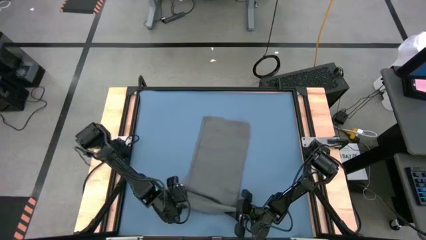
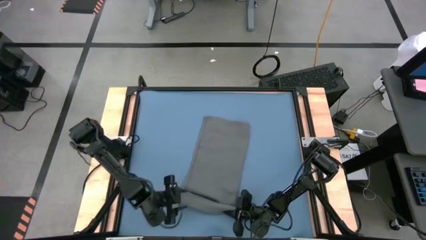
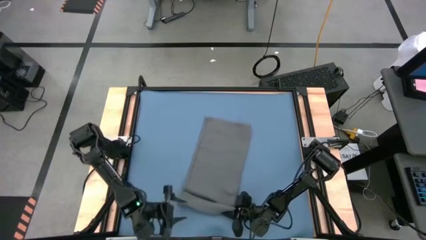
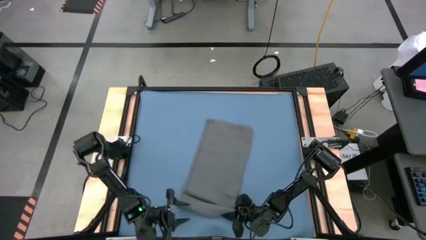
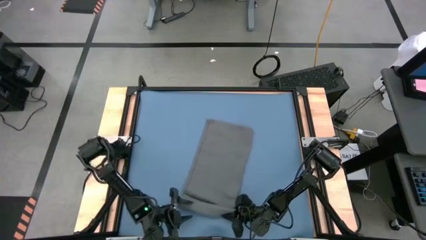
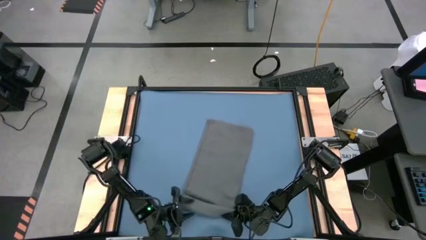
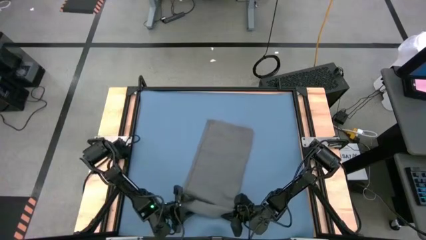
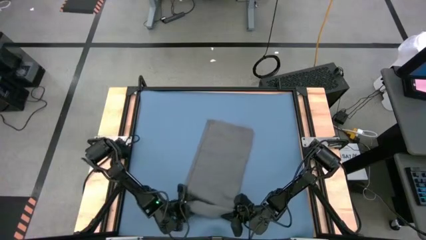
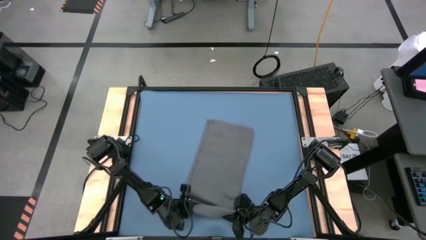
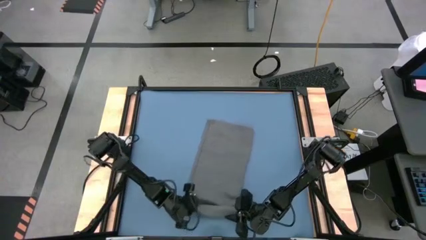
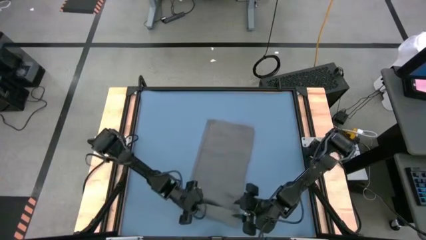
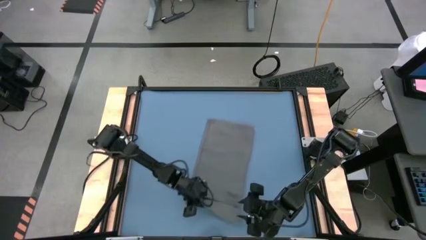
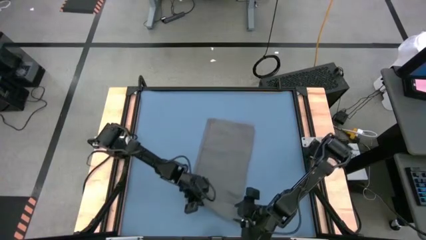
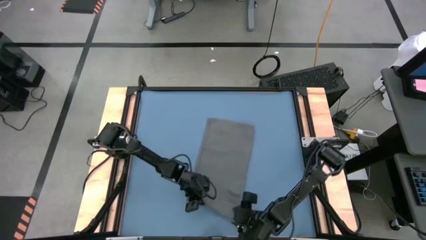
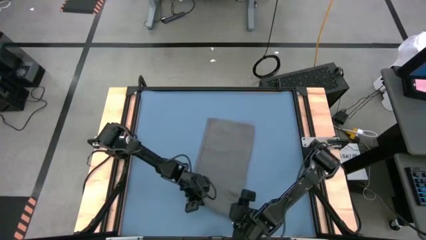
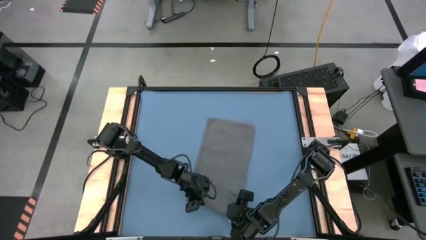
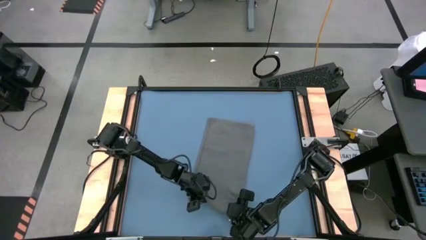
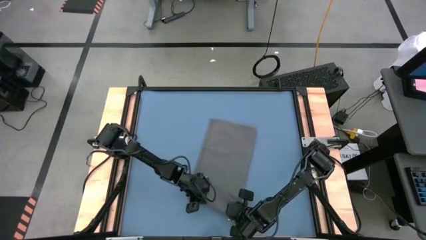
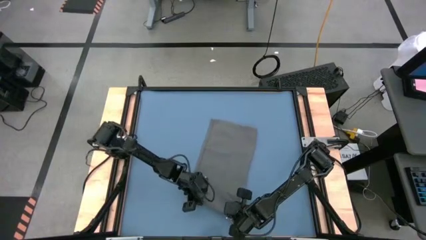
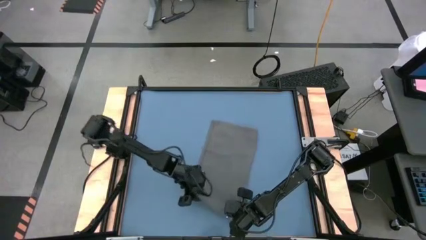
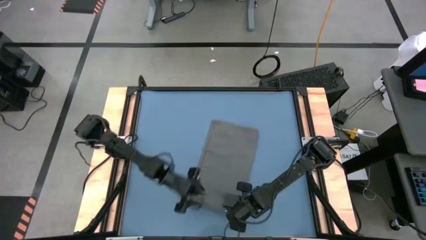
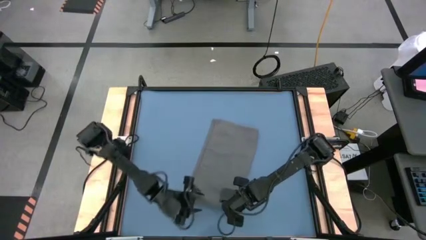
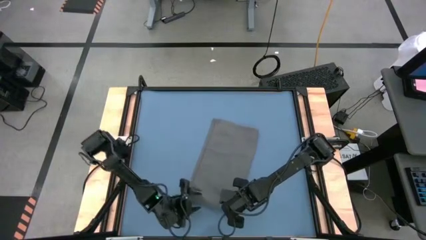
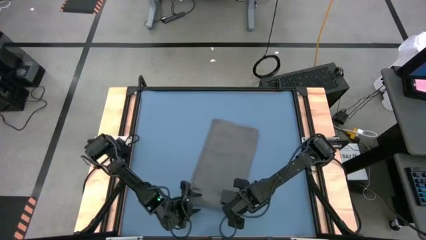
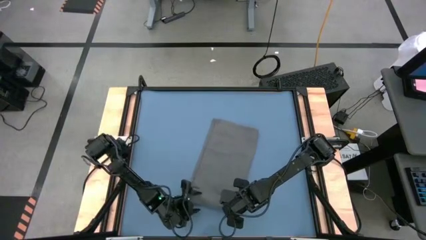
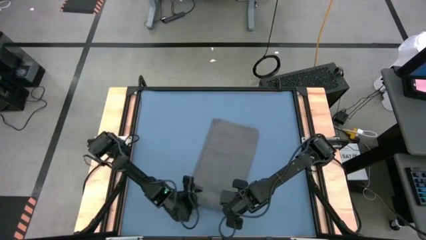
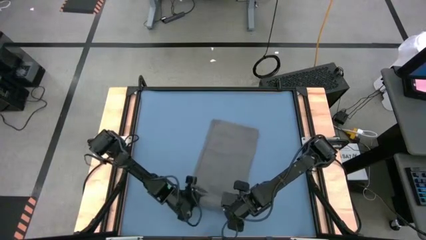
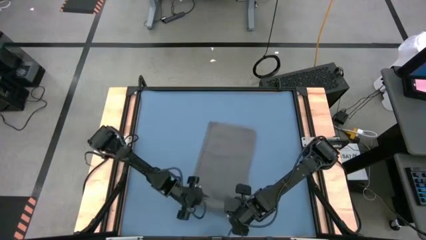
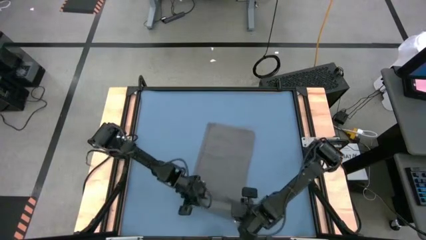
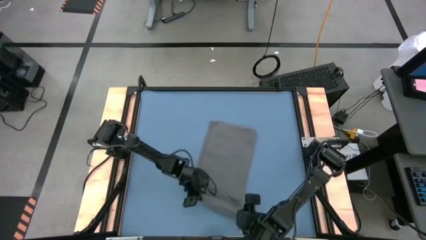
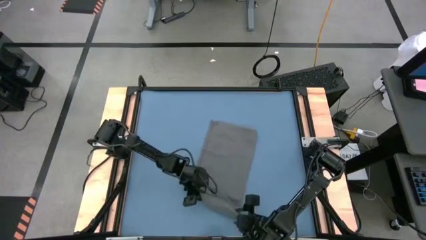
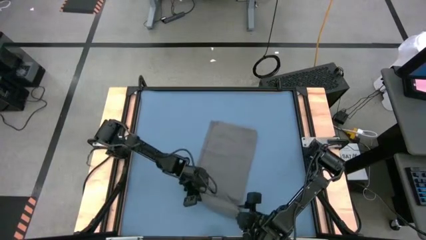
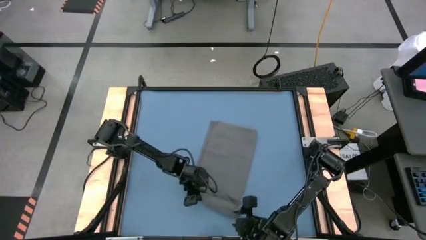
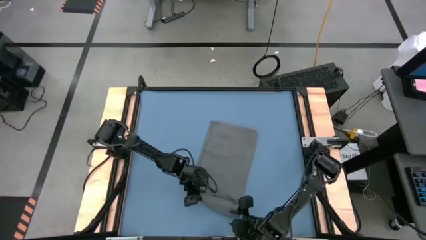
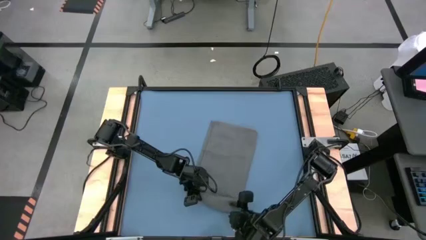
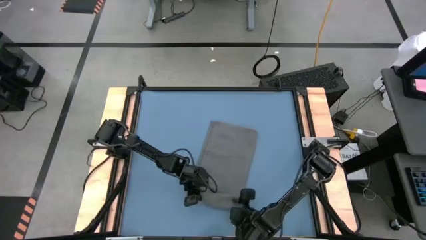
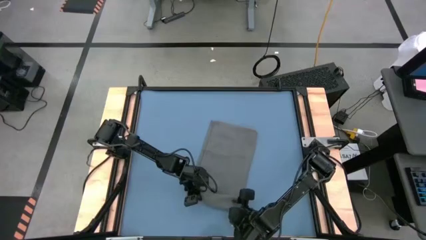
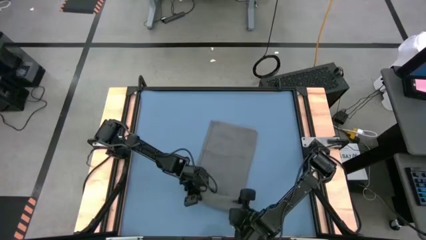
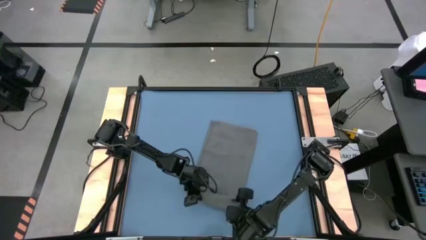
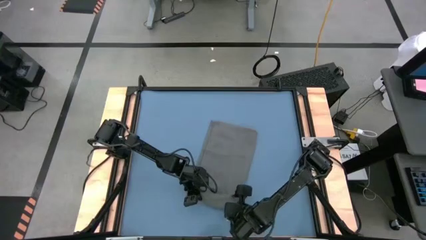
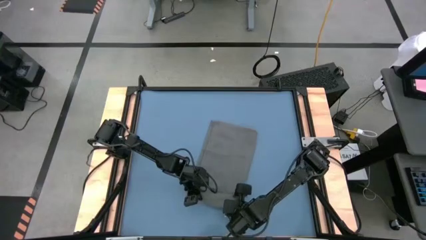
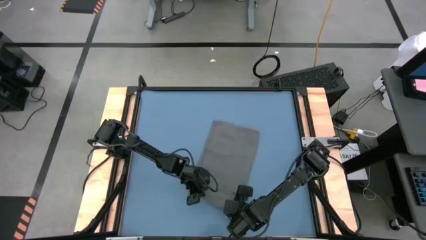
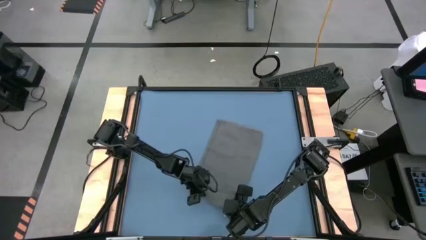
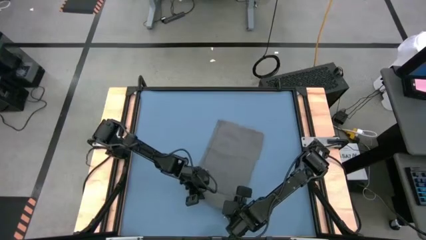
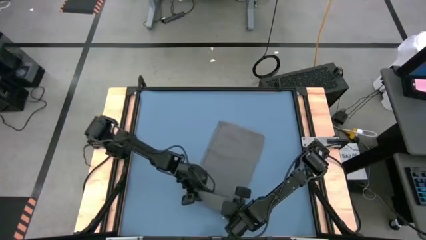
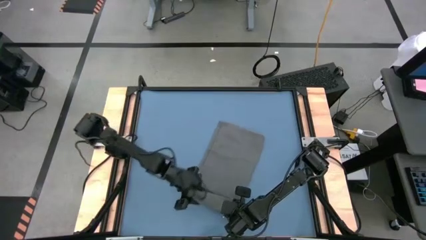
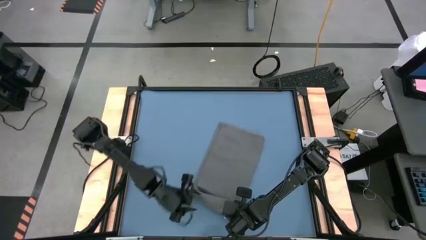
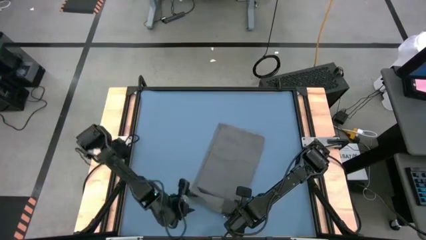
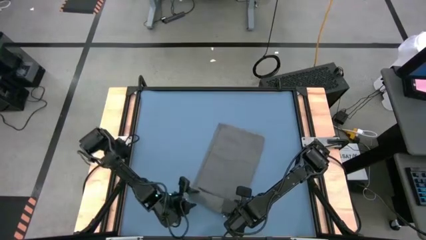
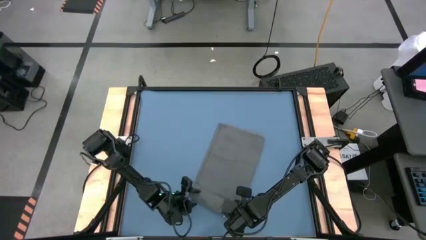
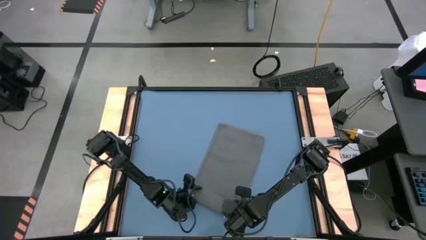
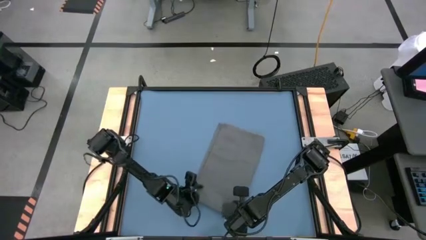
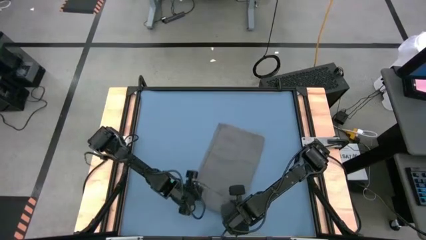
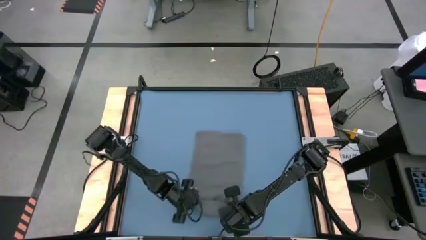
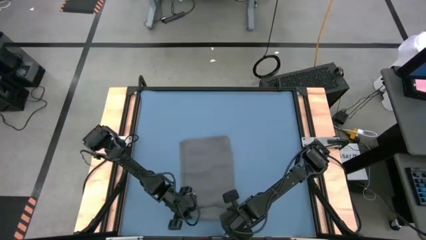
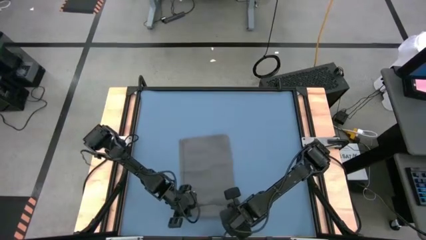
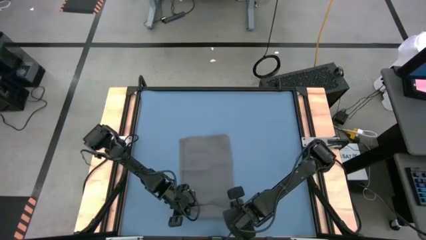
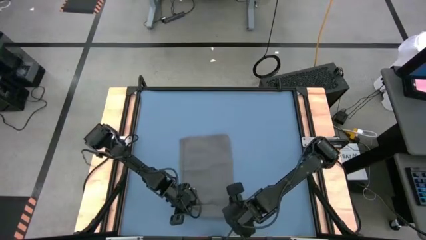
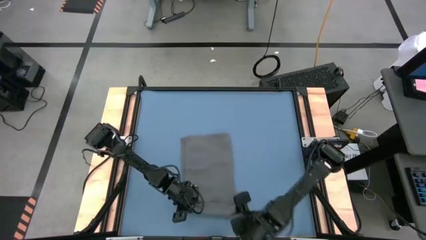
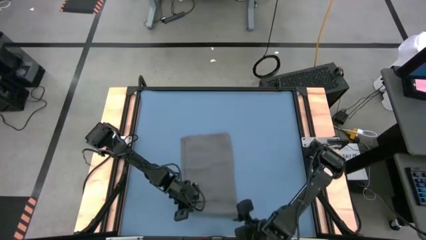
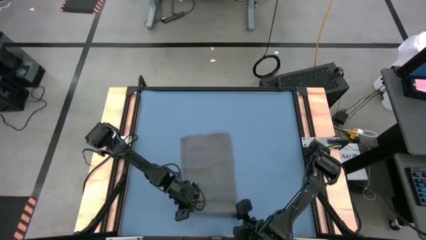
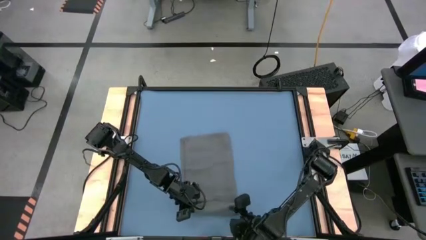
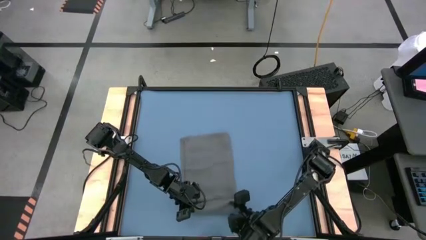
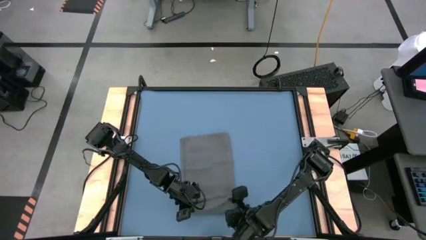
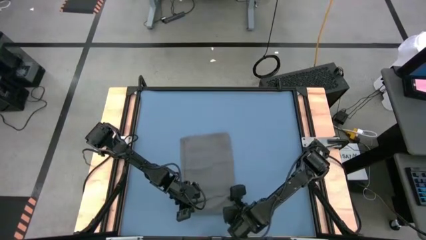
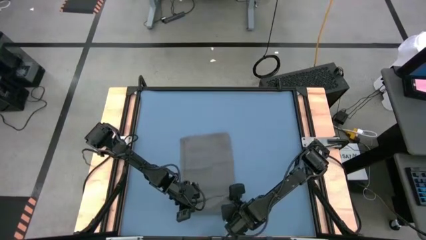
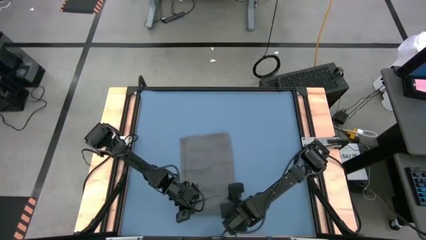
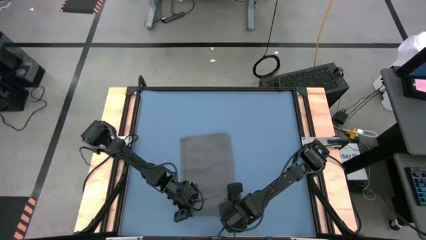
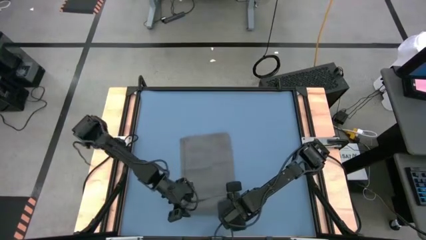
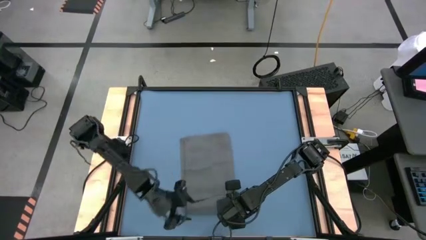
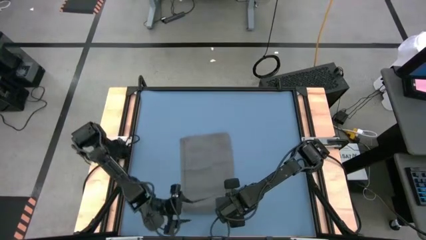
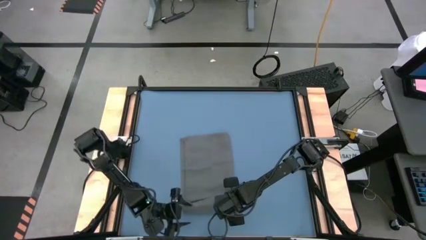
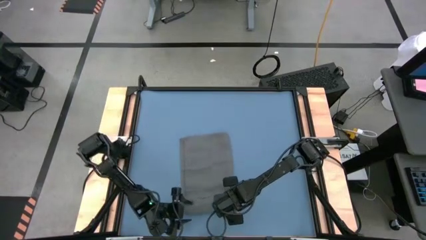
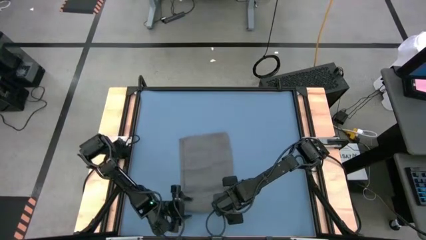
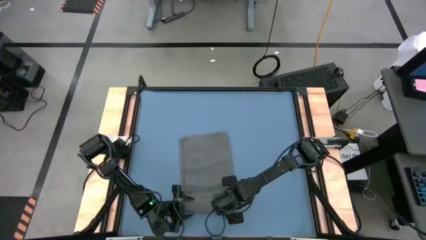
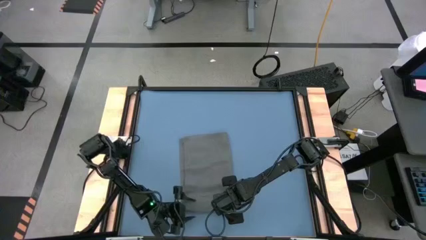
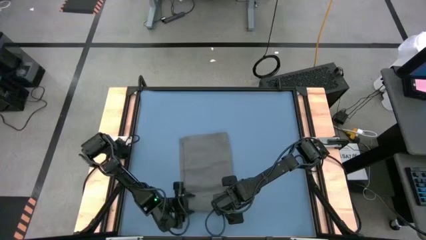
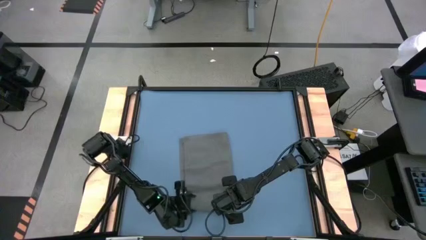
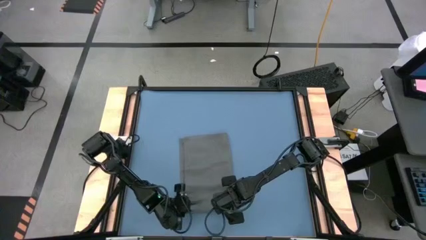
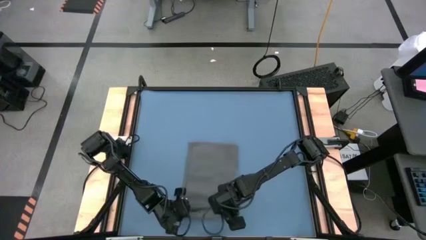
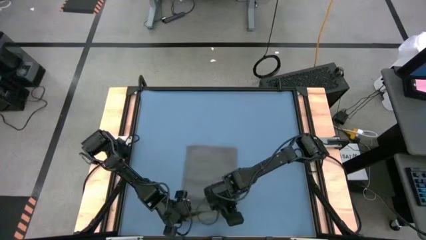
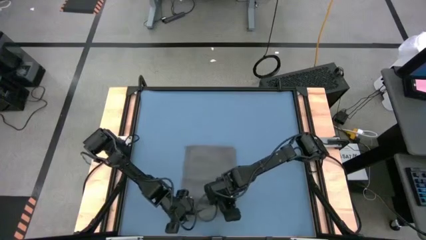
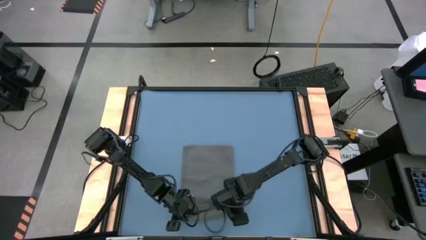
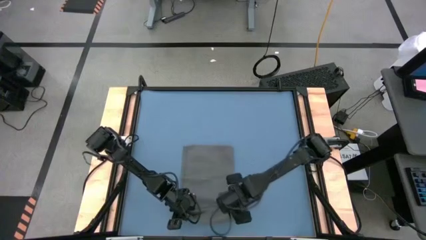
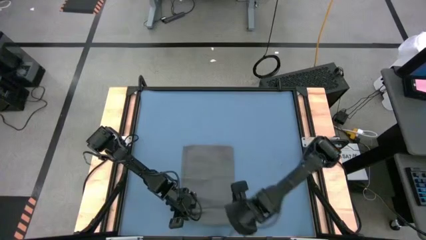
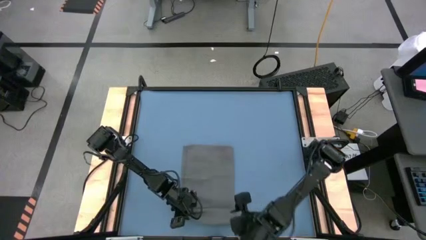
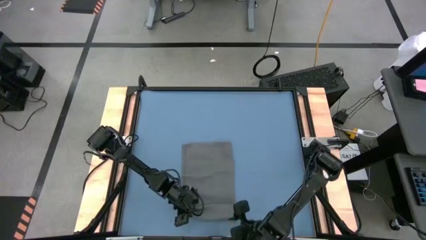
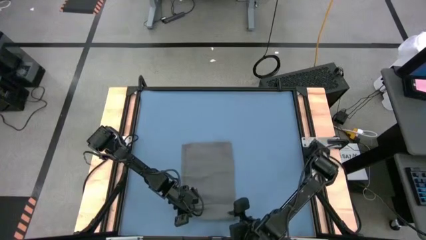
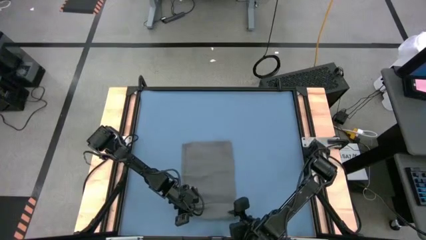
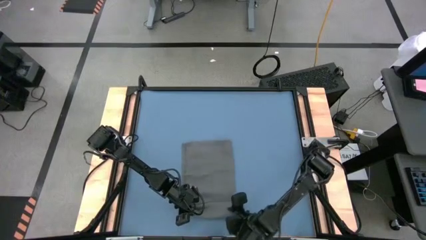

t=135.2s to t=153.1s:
Task: Roll towel
Roll the gray towel
